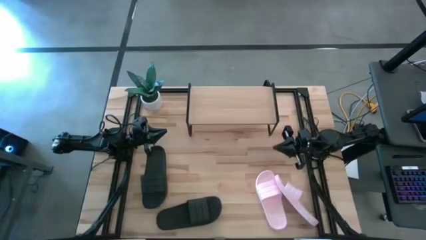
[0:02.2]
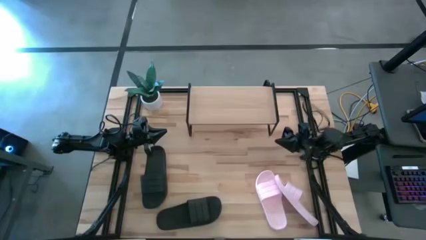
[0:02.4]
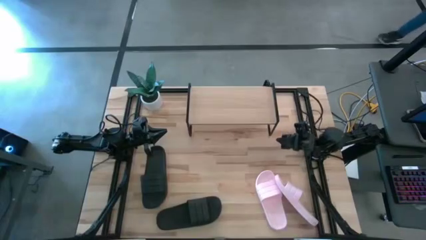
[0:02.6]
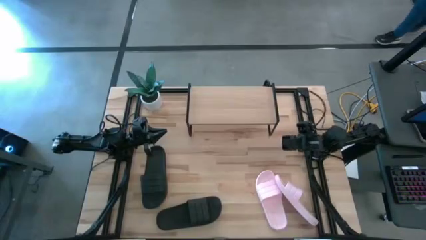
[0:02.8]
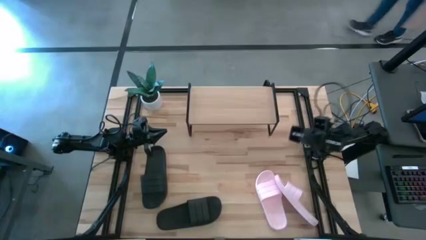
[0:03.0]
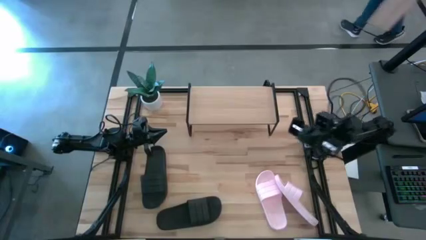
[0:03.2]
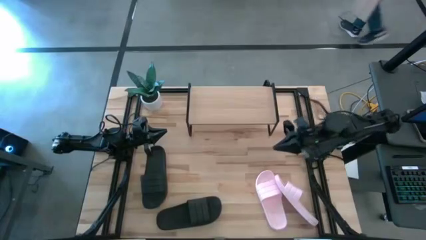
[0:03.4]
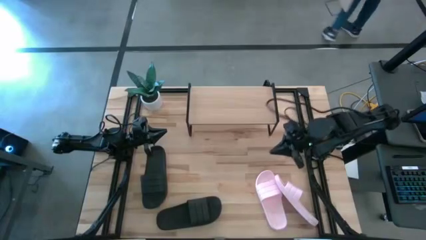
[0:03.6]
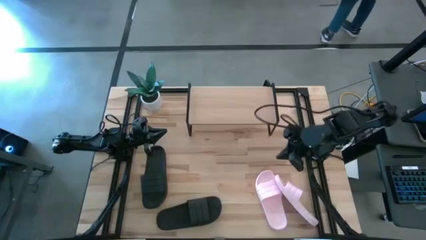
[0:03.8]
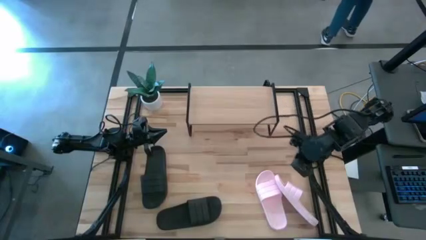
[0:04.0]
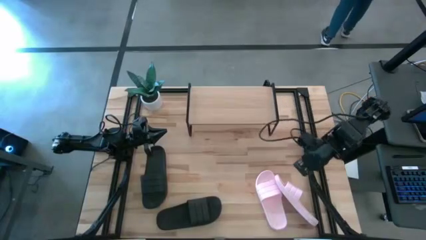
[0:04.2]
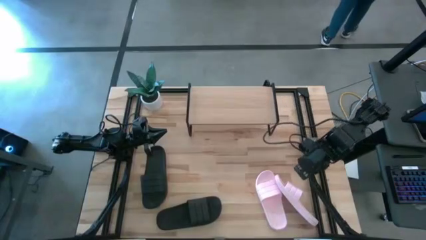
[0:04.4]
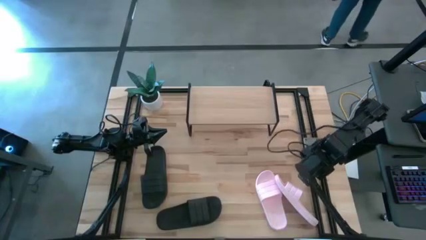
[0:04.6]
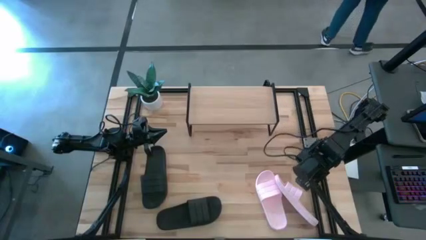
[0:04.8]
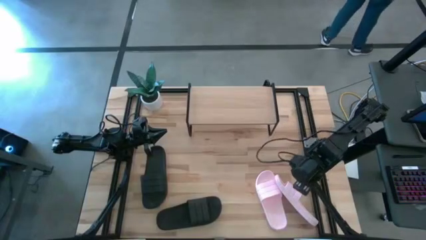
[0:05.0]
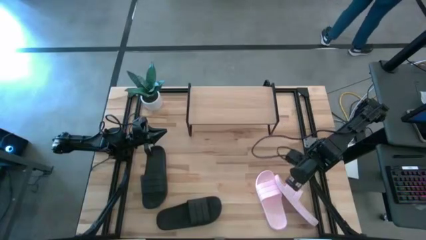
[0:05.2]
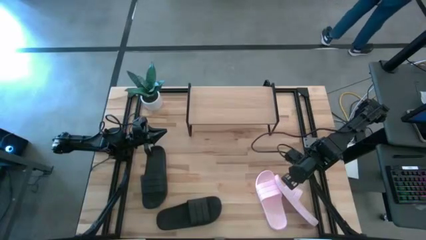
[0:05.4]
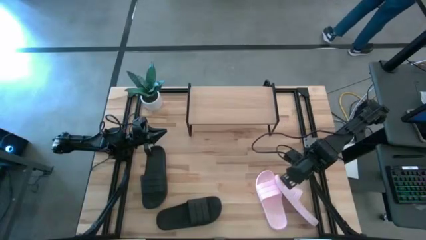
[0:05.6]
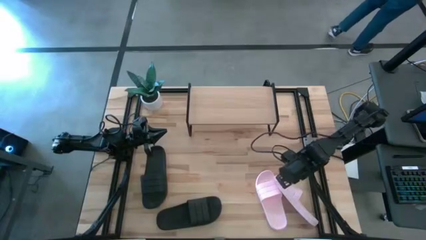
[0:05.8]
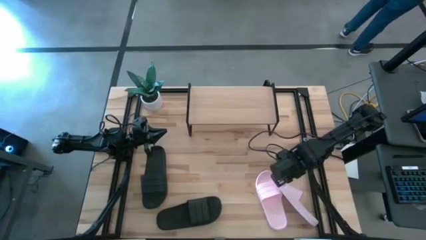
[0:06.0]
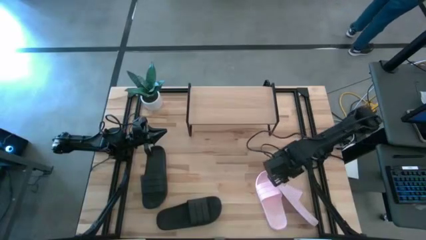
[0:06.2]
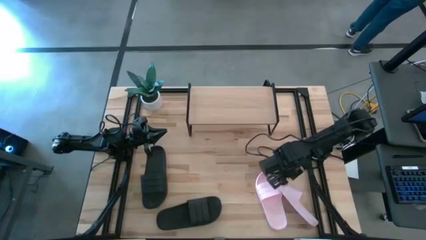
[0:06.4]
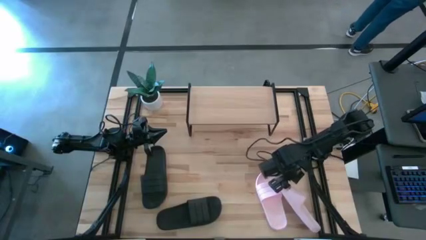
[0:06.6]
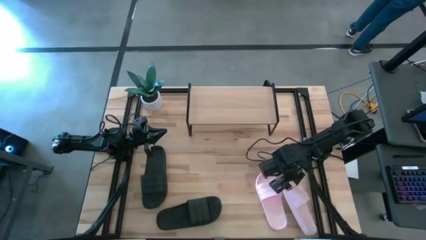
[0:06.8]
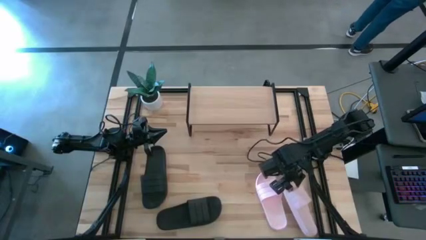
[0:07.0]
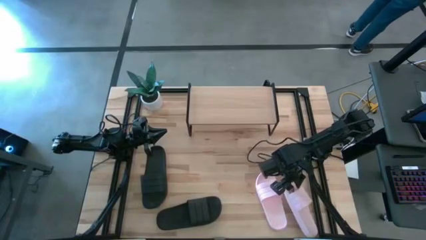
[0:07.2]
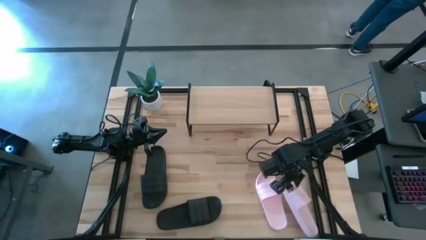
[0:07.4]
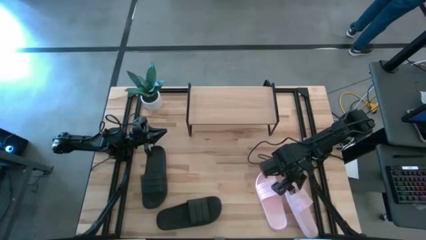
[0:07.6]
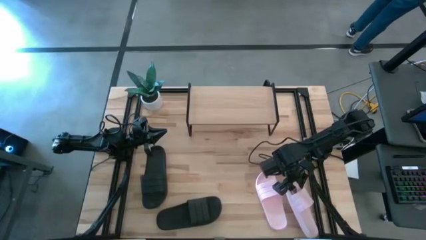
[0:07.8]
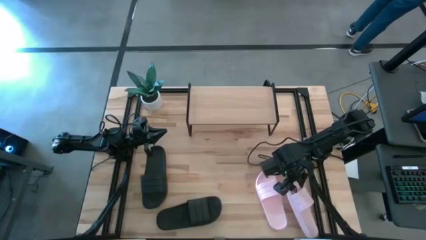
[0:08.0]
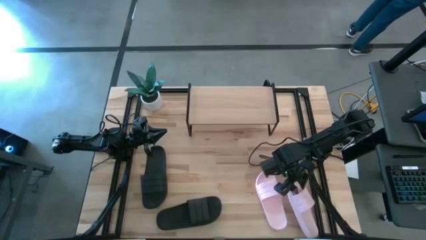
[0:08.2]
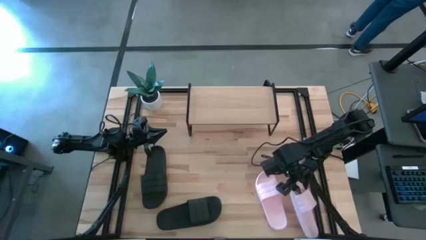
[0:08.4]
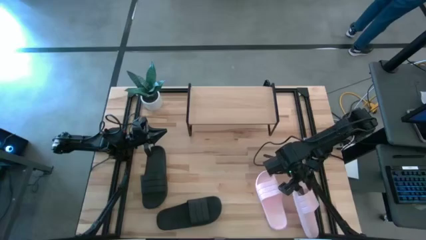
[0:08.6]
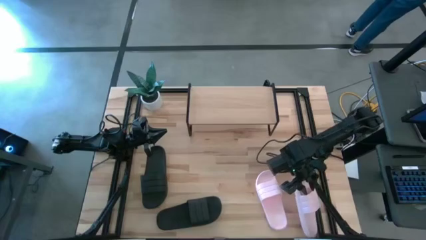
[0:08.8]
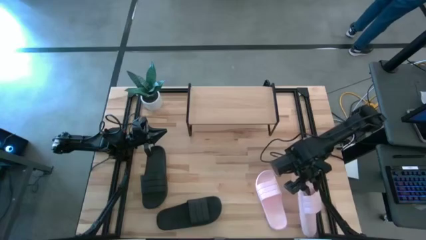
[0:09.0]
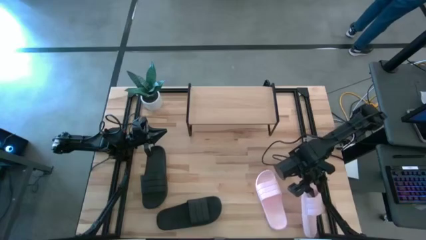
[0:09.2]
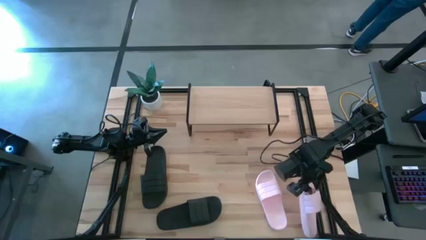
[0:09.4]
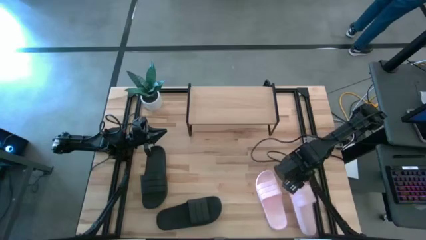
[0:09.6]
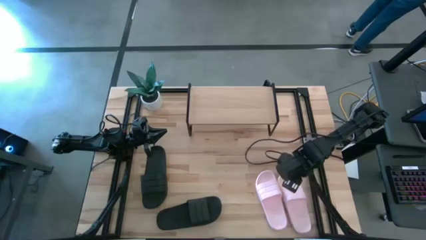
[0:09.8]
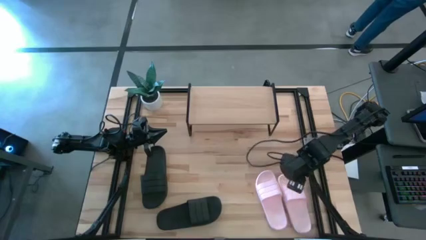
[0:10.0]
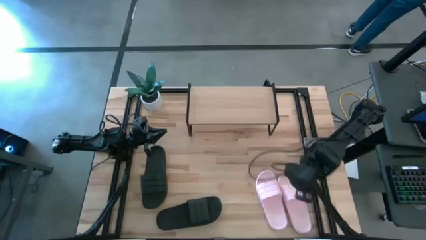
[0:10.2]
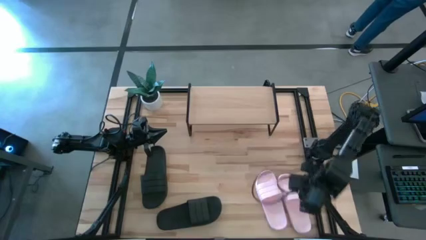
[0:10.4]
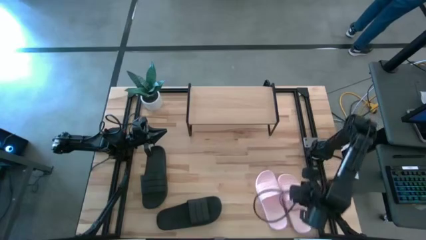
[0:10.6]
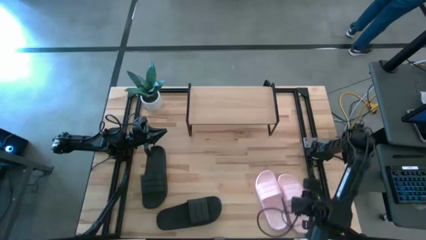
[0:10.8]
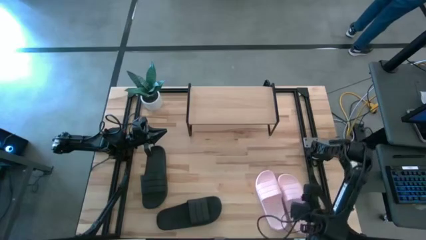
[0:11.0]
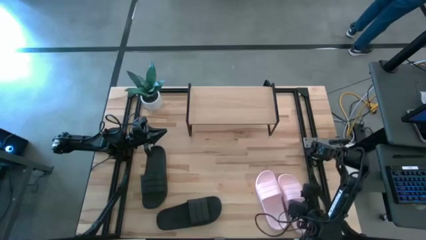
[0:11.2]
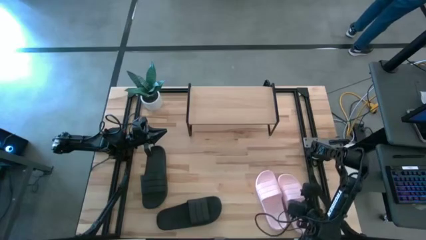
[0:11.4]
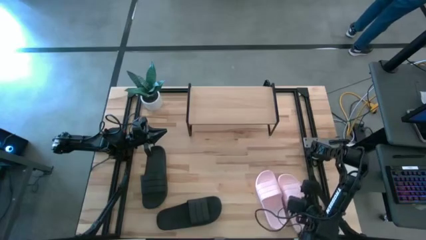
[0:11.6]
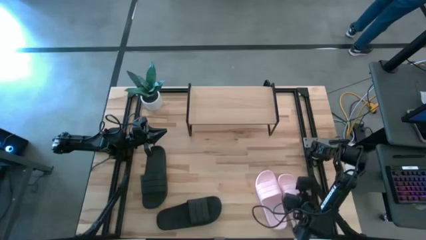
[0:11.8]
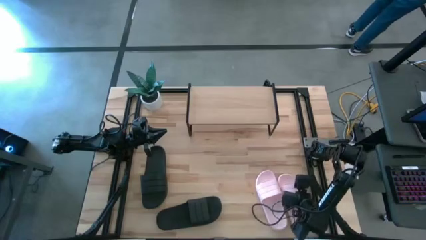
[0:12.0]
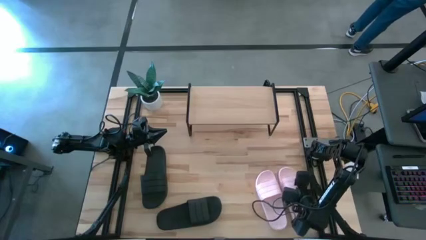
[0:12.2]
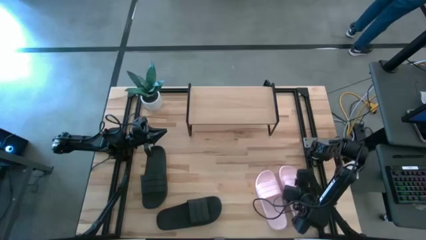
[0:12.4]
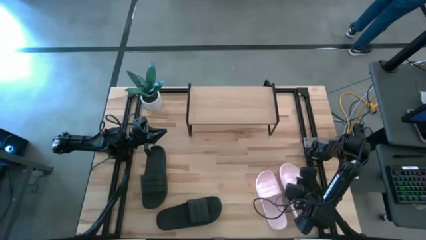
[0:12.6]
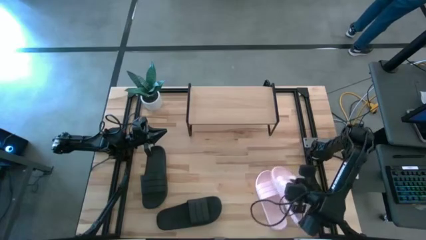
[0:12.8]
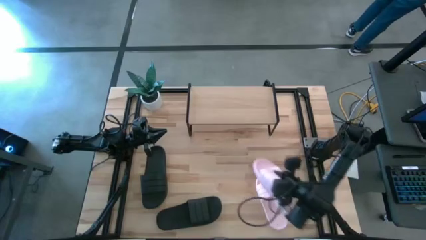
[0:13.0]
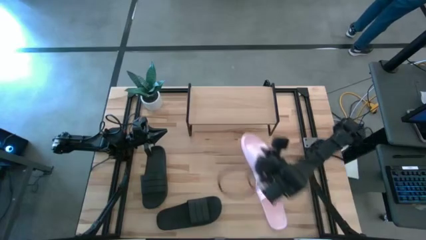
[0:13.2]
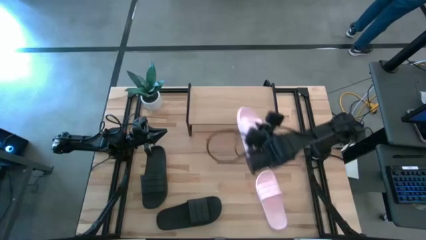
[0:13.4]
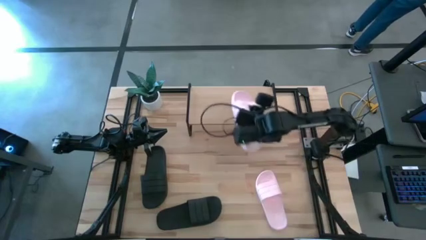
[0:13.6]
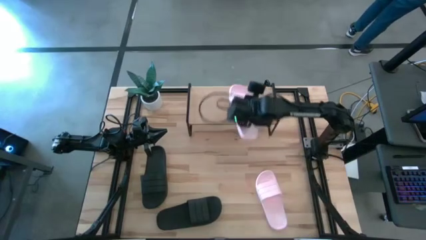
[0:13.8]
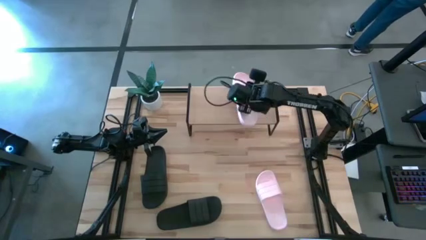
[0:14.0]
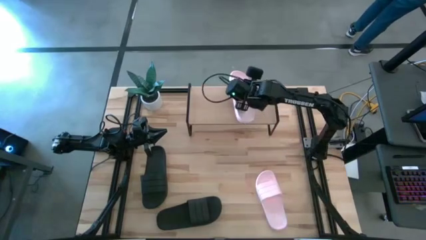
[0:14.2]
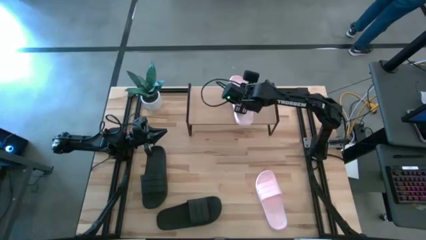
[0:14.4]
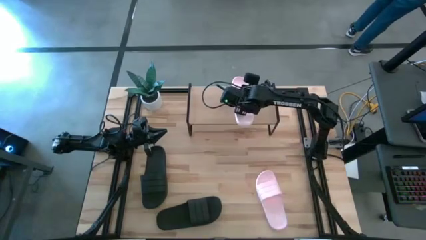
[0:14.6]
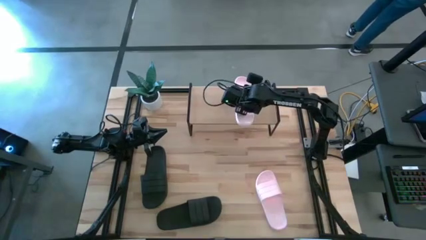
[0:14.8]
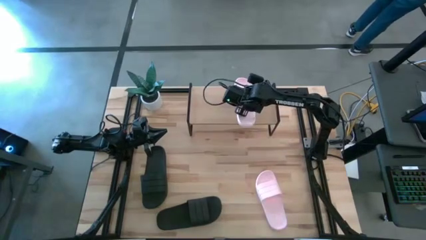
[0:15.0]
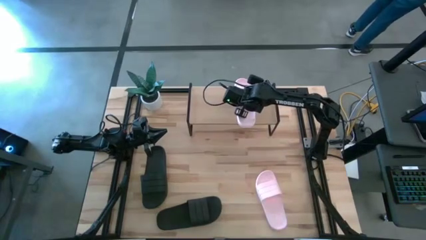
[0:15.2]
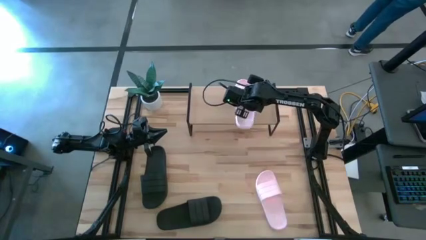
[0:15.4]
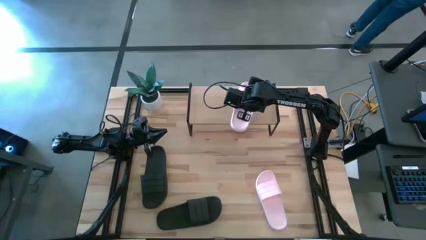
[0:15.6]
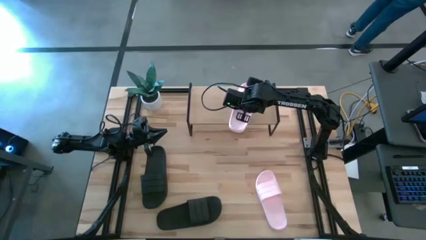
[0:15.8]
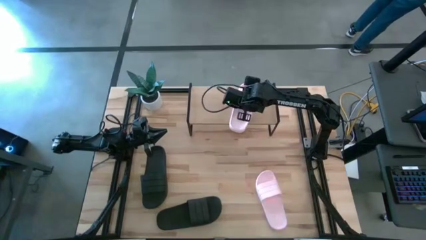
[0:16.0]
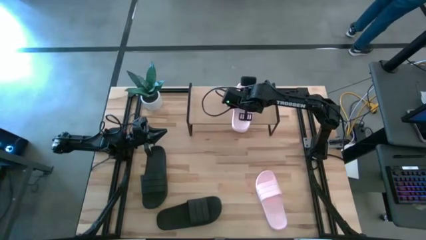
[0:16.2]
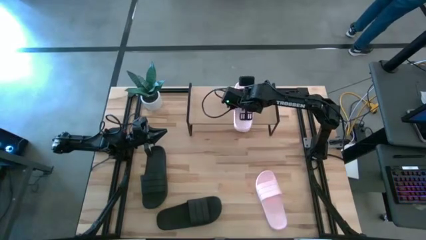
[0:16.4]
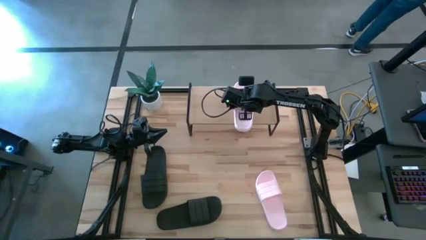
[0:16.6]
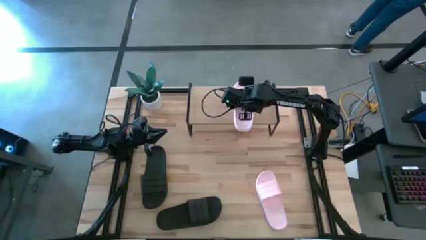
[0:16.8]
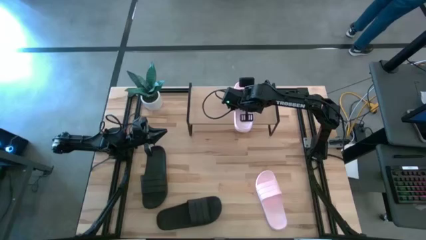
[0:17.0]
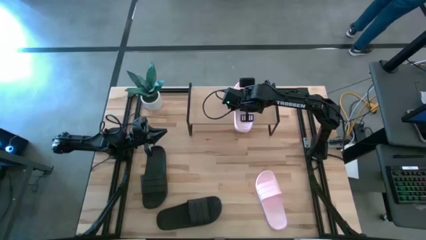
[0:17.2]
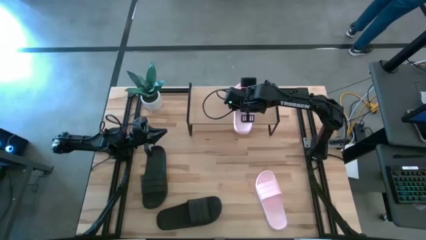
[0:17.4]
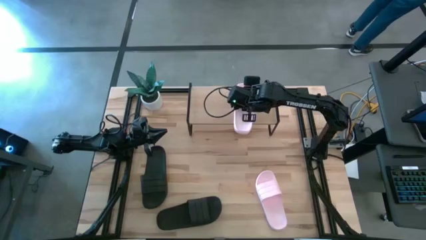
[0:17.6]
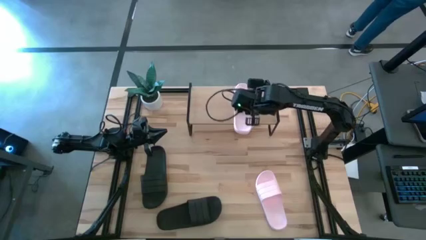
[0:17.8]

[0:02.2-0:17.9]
Task: Pick and place slides into the shelf
Put the right pink slipper on the shelf
